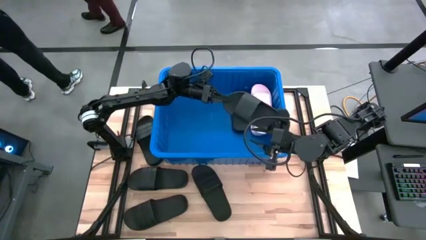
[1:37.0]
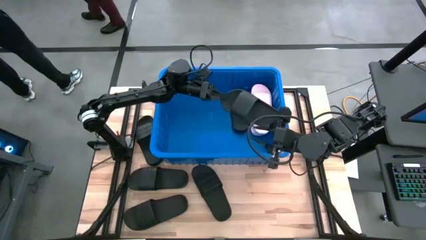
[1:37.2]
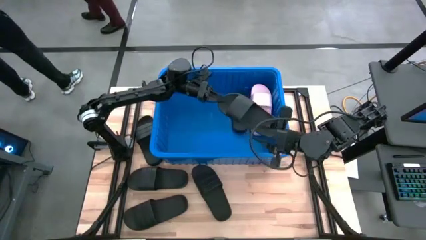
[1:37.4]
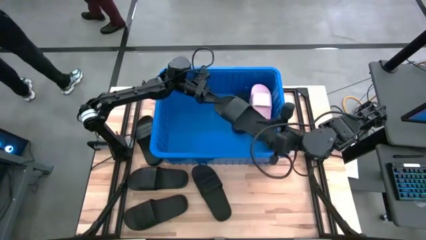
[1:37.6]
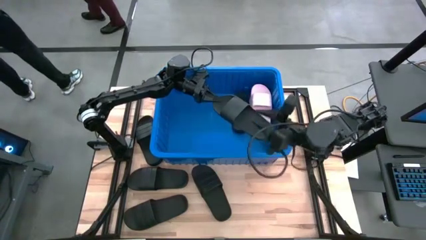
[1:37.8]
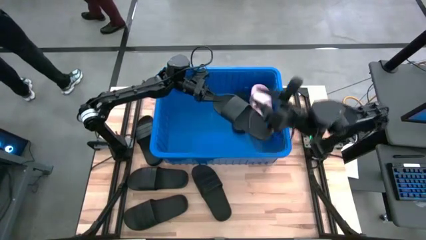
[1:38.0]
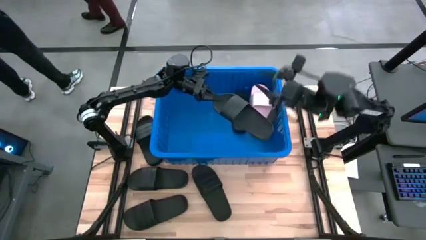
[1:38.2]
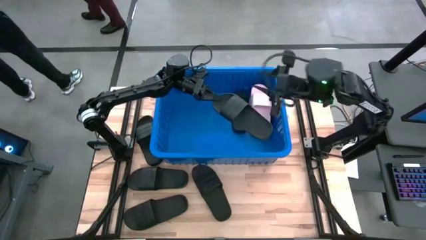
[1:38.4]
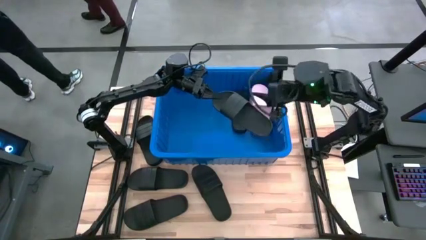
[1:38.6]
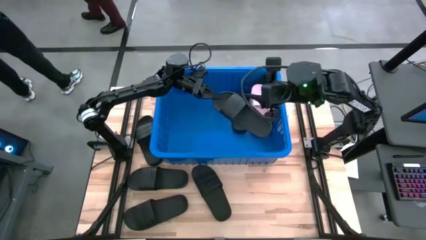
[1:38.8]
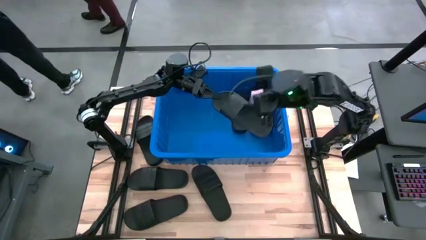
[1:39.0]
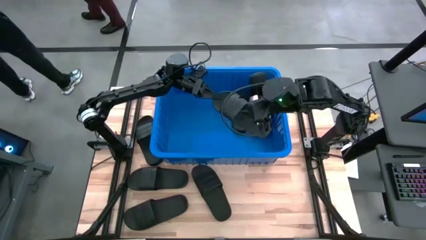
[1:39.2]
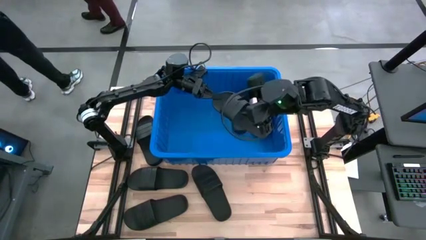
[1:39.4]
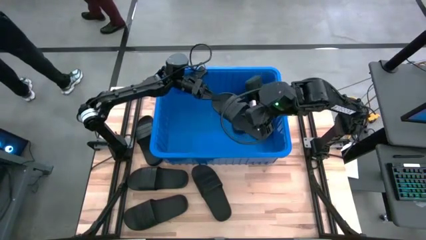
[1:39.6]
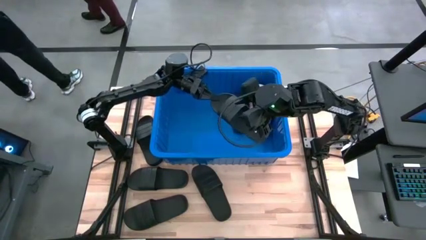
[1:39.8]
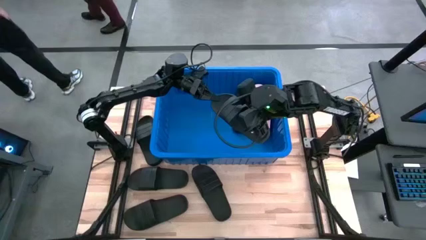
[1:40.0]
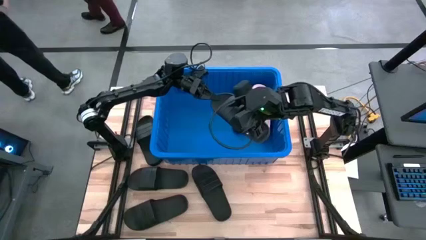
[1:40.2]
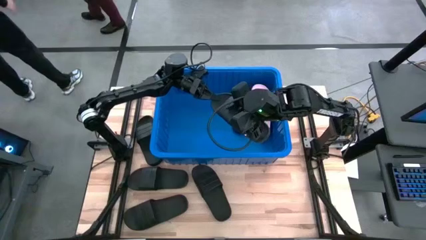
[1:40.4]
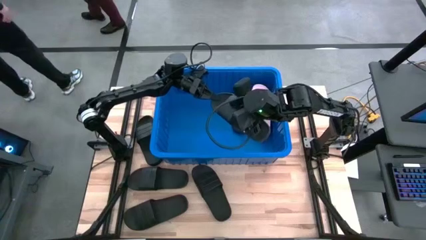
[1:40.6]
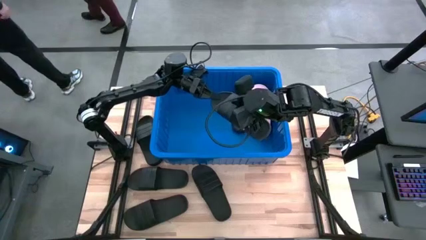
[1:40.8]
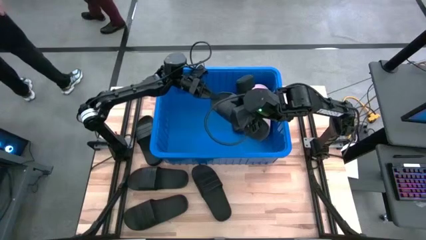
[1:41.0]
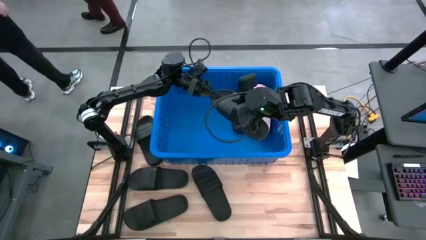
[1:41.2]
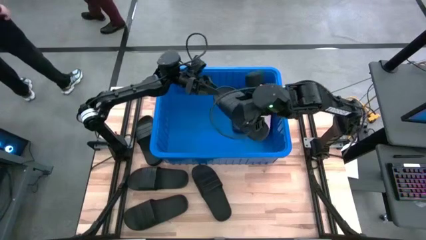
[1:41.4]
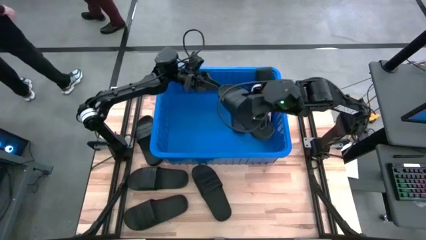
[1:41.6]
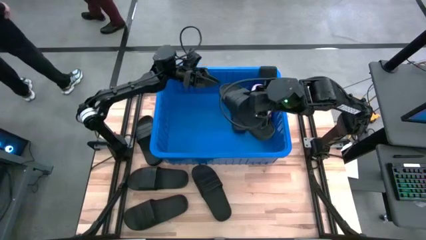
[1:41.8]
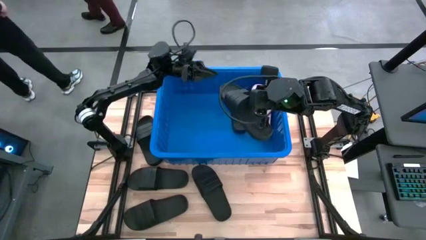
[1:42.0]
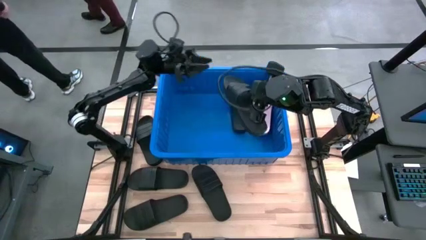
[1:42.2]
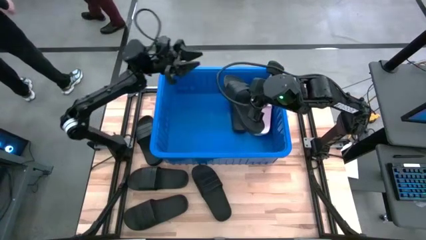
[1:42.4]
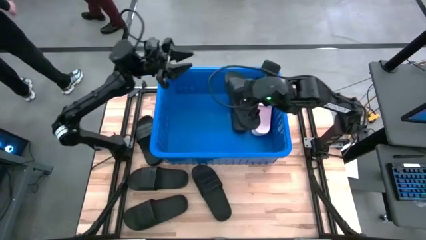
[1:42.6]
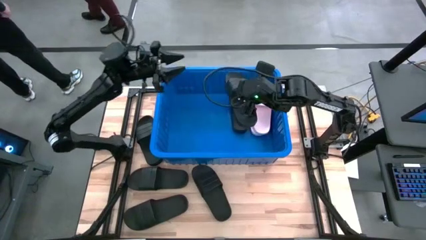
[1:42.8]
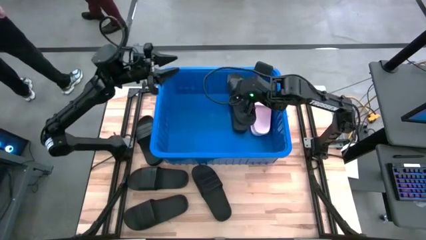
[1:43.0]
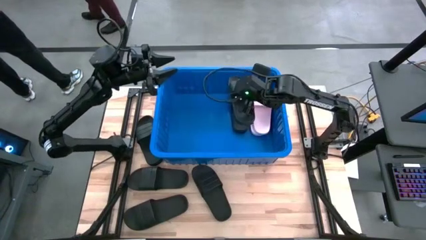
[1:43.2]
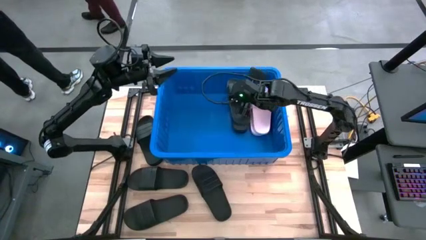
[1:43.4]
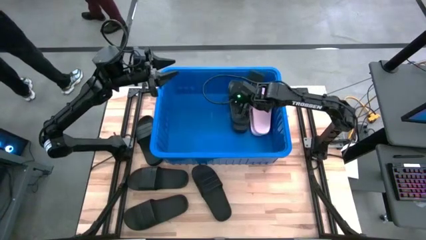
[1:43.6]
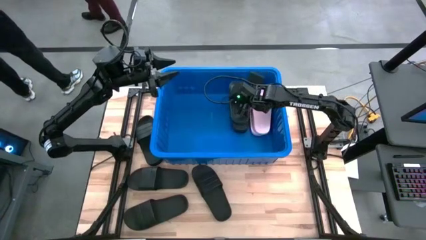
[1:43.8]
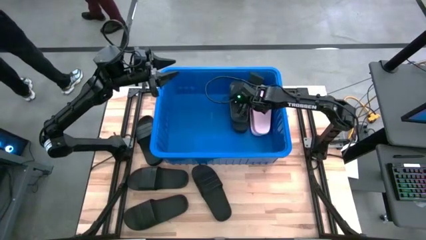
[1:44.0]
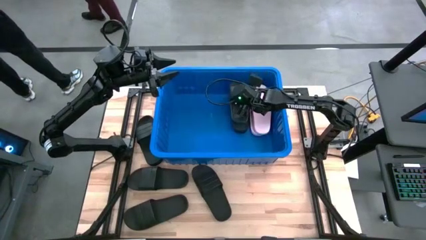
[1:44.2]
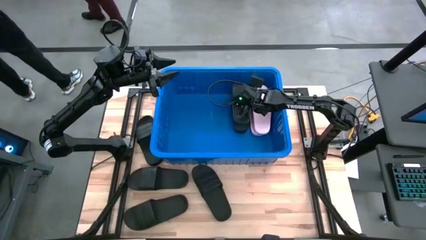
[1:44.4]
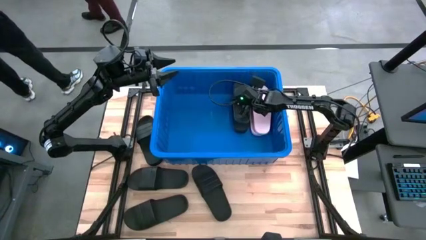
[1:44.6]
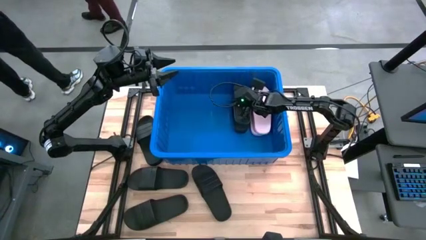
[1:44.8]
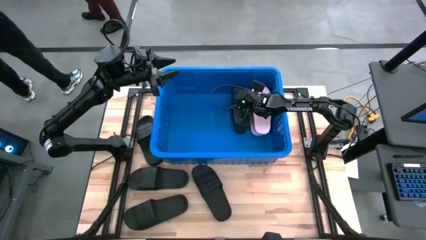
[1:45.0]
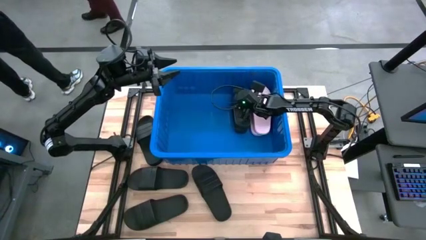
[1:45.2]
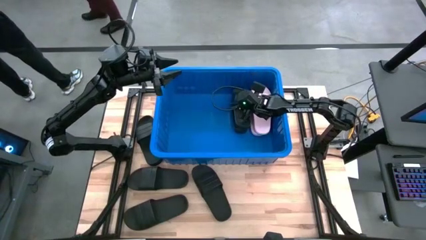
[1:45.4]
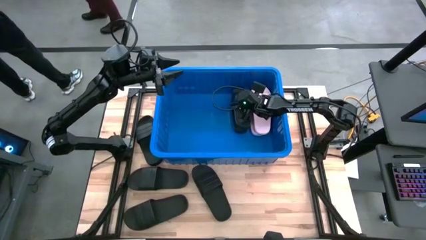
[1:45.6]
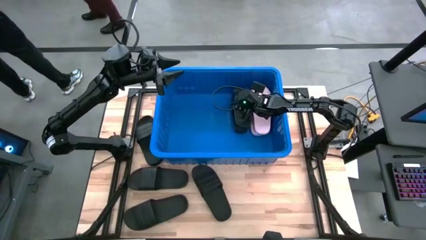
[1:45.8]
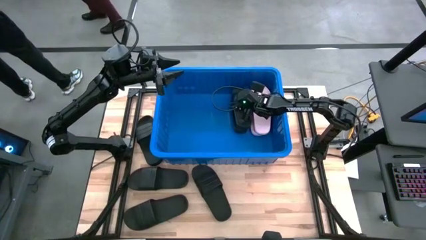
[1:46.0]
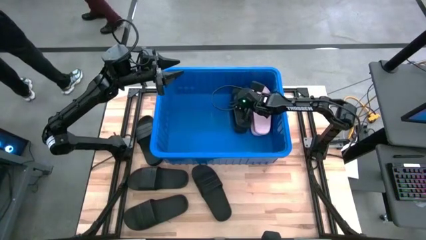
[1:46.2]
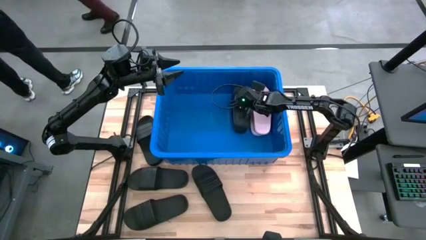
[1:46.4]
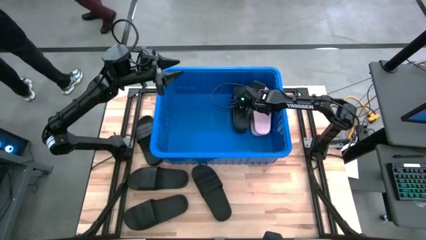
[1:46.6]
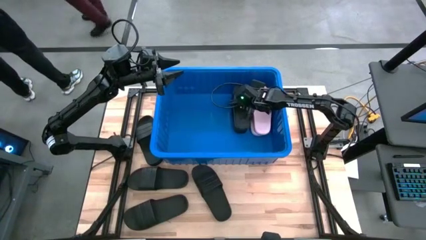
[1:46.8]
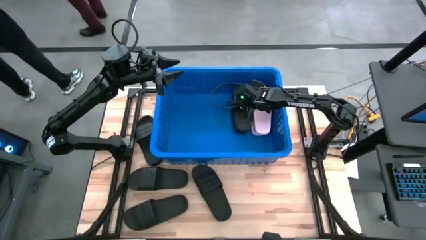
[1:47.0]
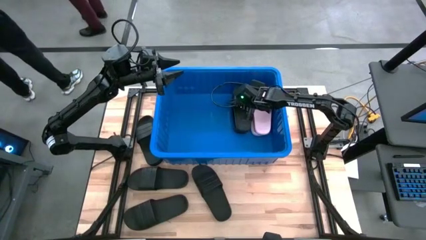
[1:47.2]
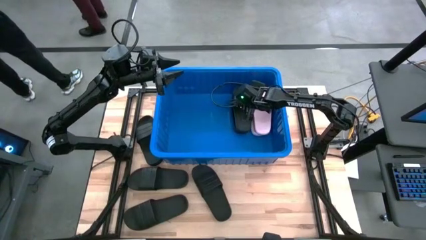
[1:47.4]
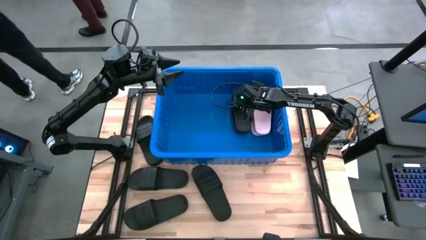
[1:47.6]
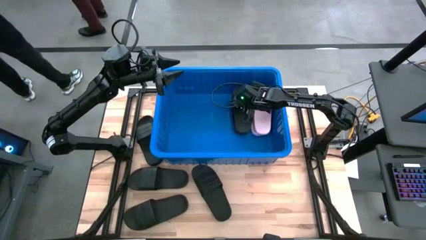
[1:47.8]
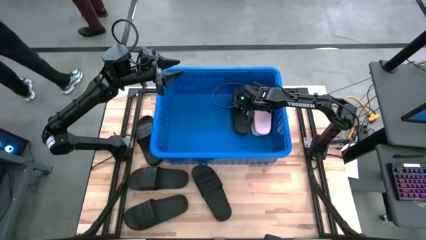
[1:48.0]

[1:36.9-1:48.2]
Task: Pick and place slides into bin
Stack the black slide on top of black slide into the blue bin
